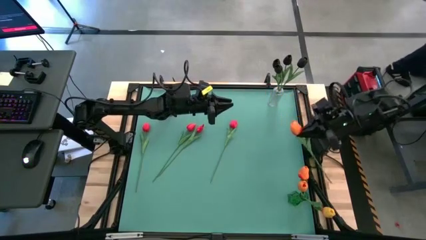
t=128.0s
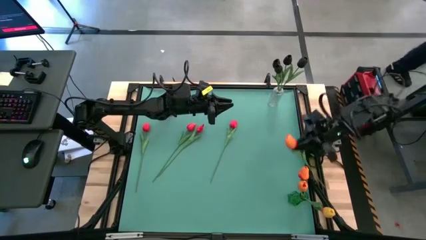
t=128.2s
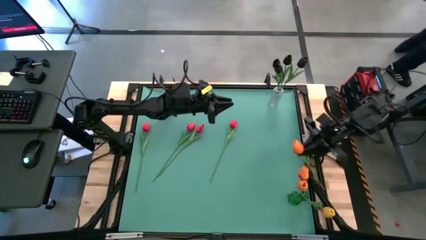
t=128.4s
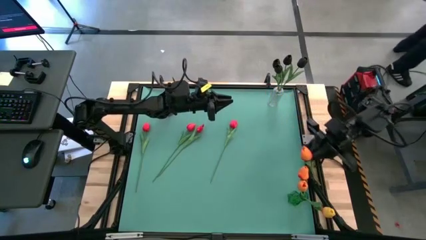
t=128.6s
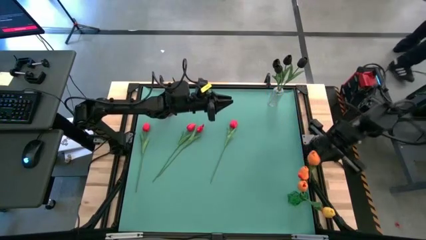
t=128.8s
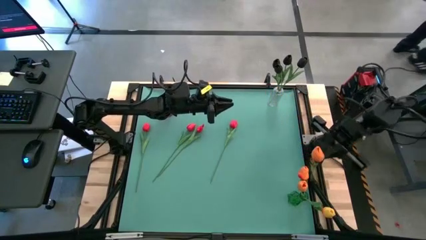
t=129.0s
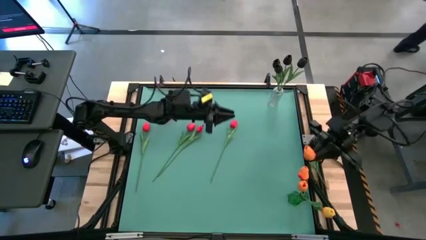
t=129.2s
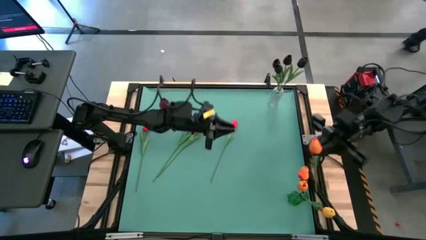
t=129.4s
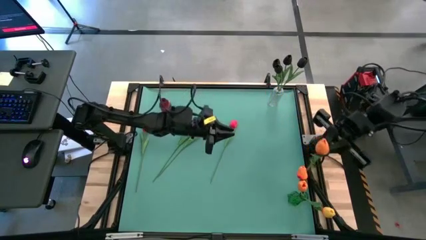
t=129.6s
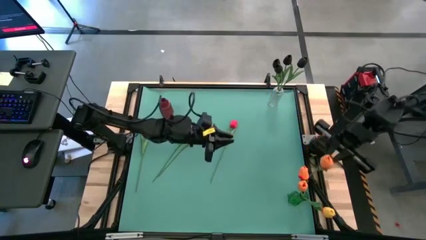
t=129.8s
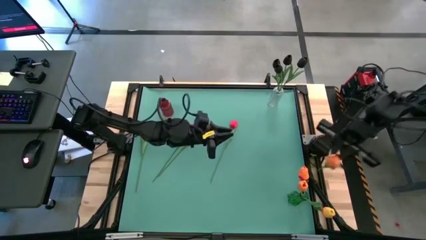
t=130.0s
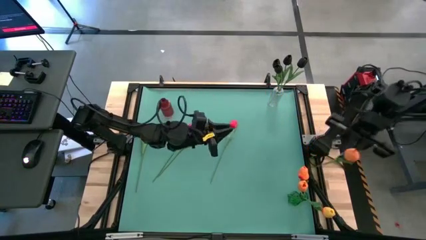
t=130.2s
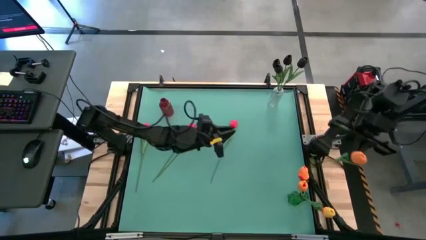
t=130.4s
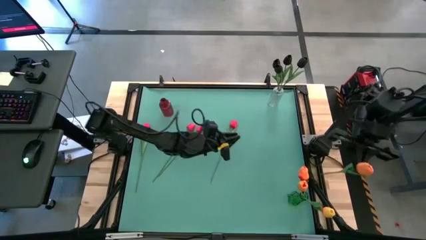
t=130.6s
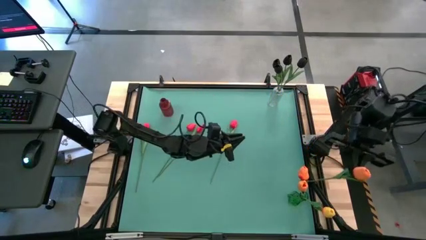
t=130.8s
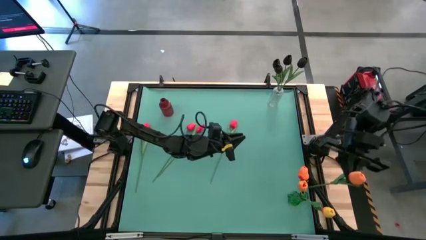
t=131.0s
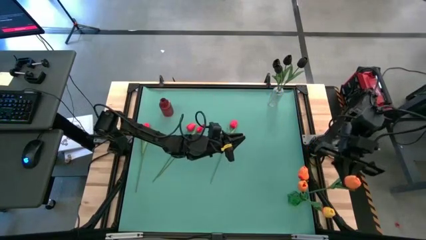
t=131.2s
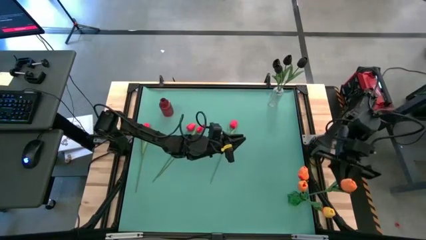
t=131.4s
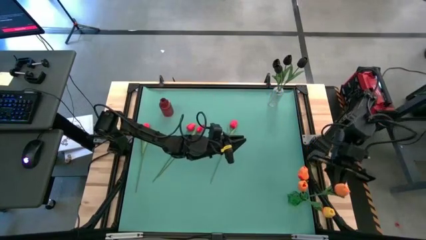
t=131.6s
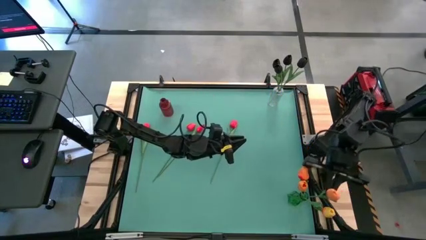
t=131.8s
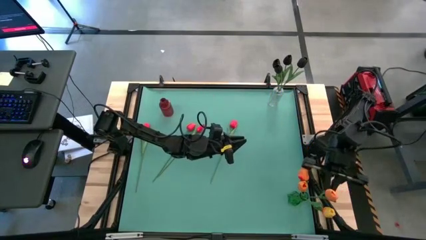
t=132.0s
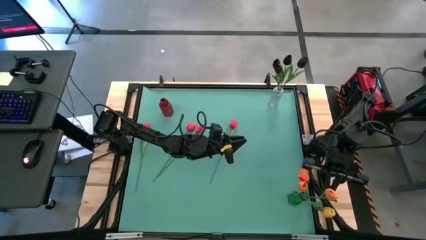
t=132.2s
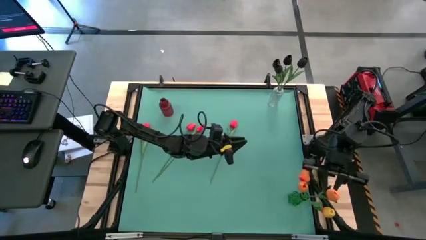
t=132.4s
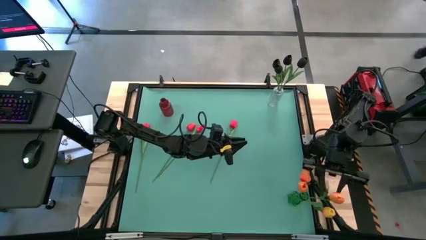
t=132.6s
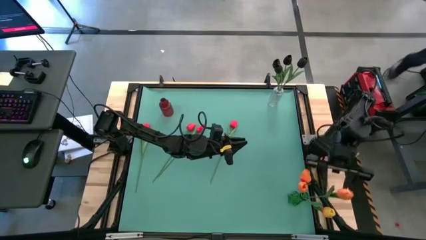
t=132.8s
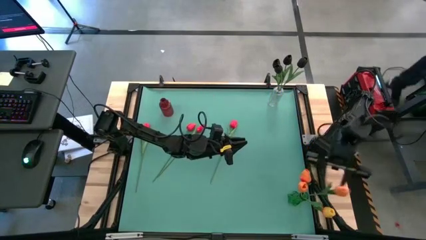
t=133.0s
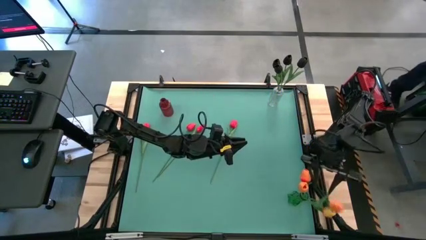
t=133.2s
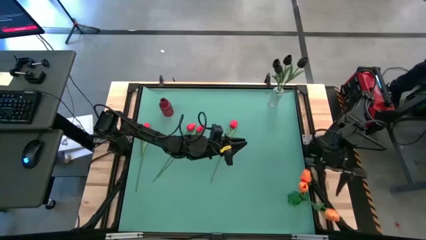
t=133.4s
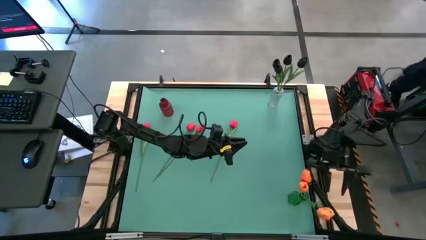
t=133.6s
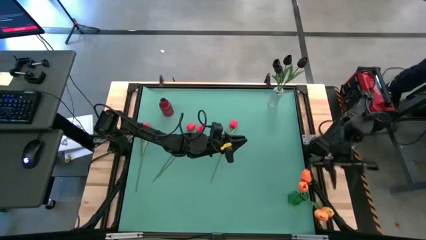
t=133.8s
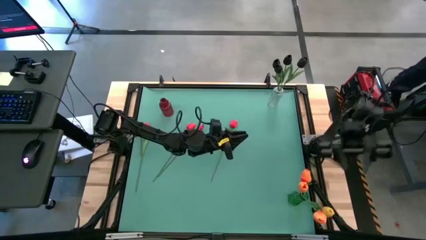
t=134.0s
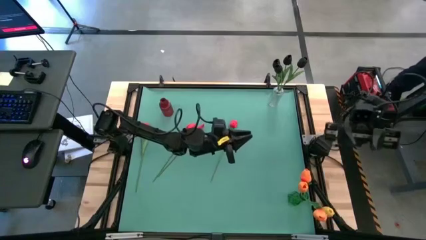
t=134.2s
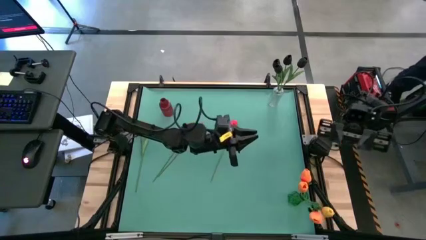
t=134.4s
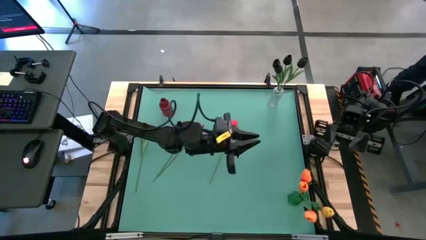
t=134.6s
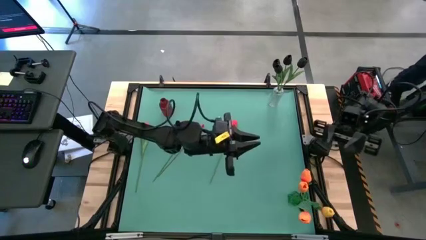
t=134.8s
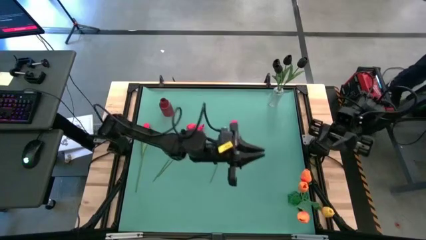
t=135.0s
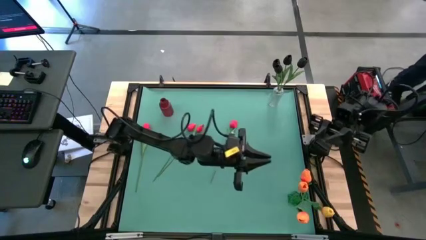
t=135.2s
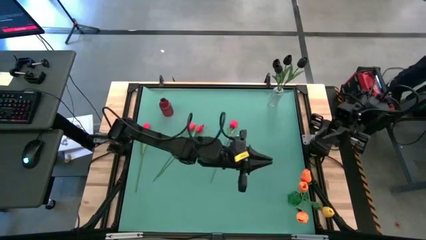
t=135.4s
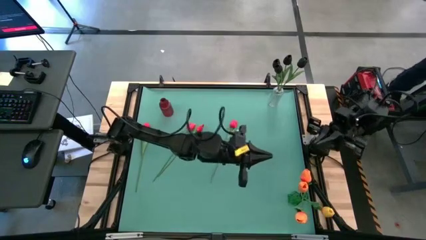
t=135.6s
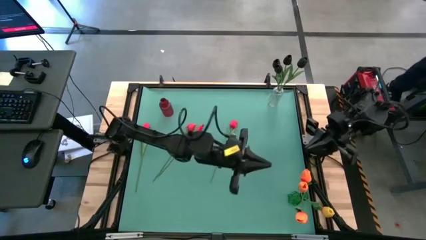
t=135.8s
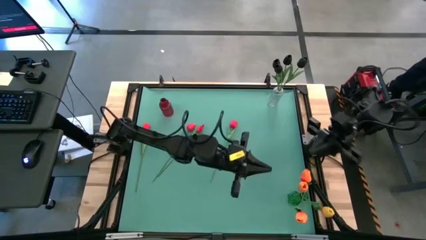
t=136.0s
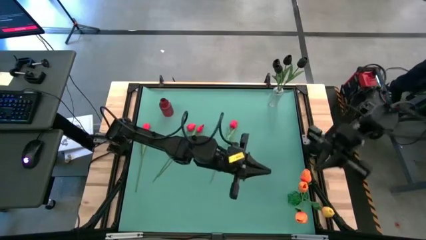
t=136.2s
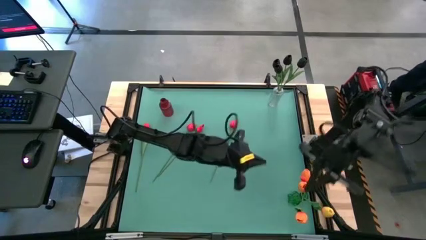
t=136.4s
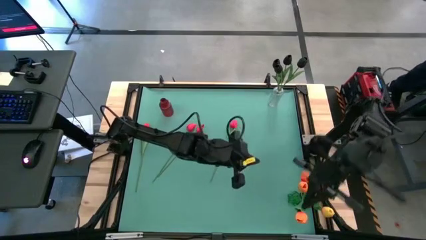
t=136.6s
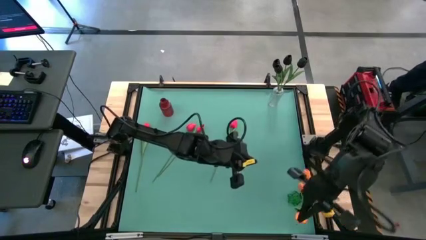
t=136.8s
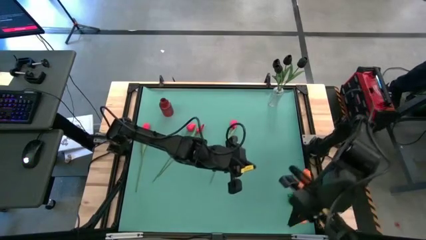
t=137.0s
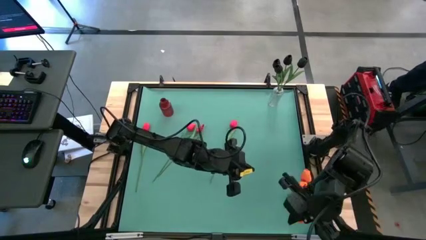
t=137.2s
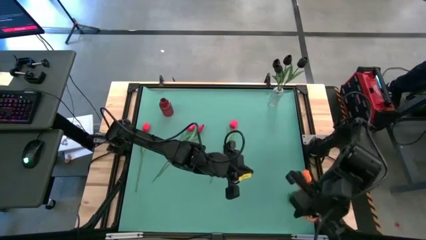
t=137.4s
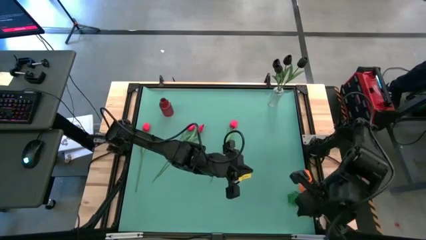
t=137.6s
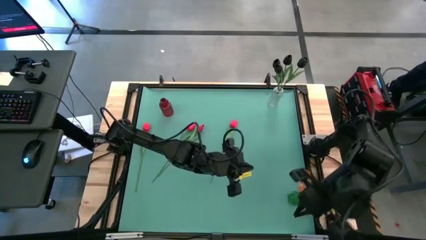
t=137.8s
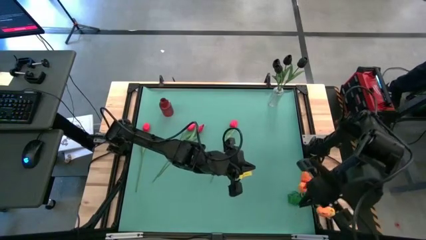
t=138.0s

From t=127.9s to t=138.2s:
Task: Sort flowers into vase by color
Put the orange tulip into the green vase

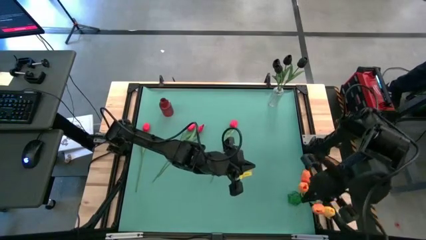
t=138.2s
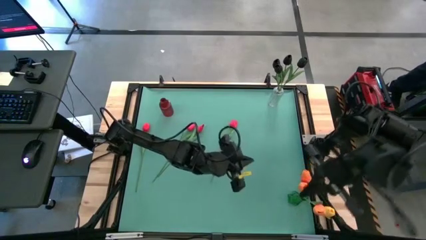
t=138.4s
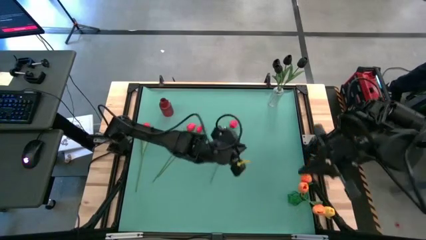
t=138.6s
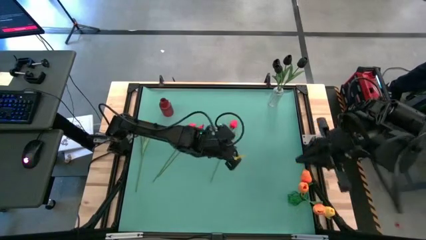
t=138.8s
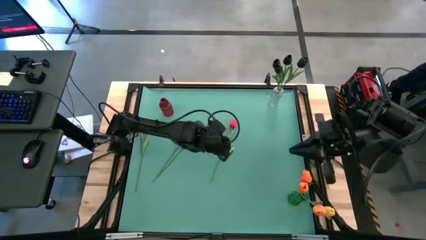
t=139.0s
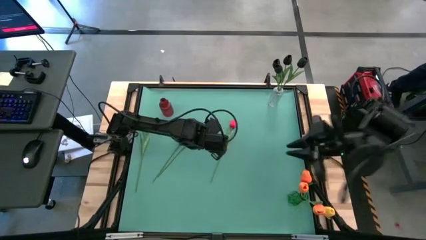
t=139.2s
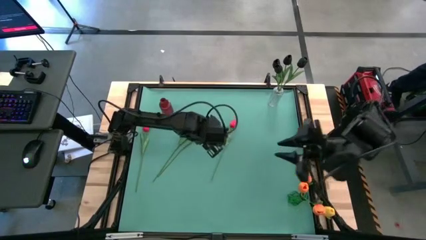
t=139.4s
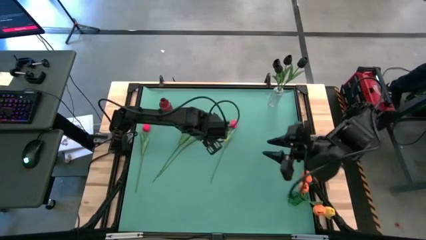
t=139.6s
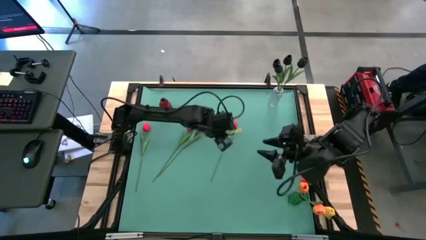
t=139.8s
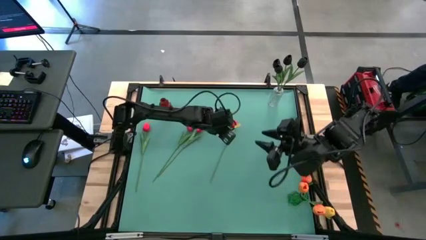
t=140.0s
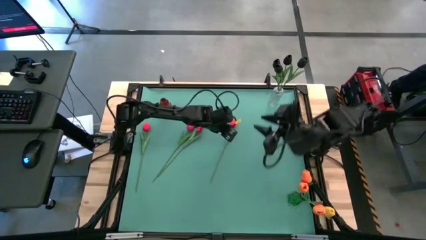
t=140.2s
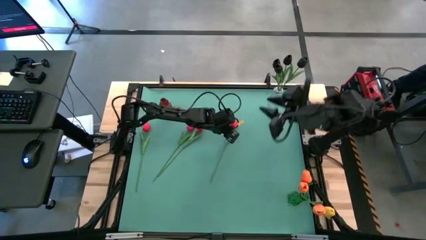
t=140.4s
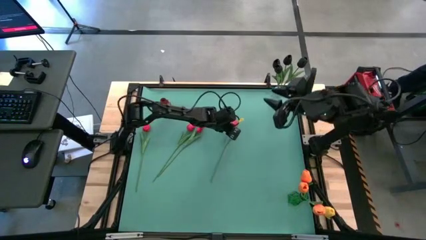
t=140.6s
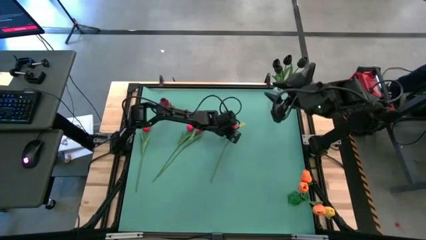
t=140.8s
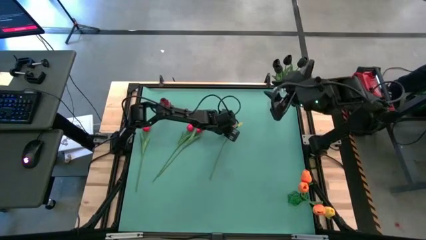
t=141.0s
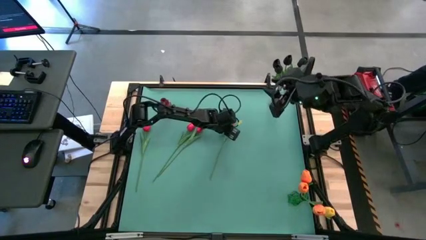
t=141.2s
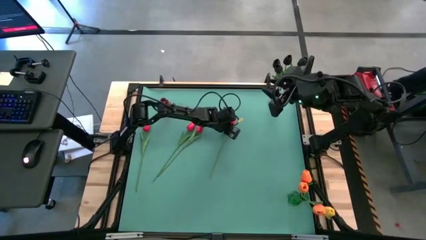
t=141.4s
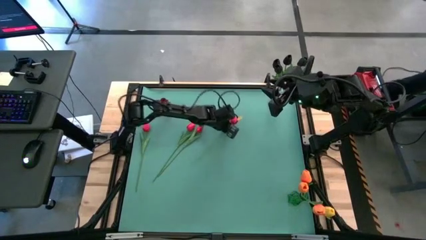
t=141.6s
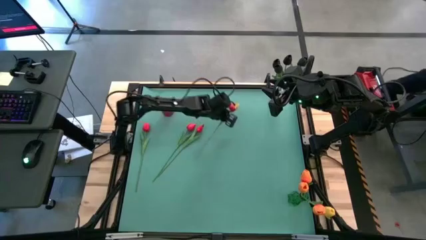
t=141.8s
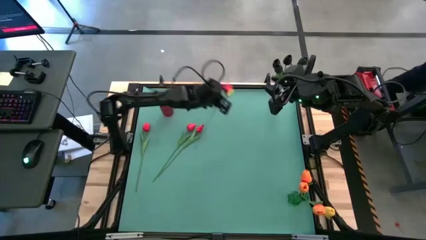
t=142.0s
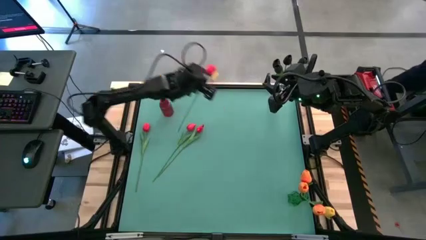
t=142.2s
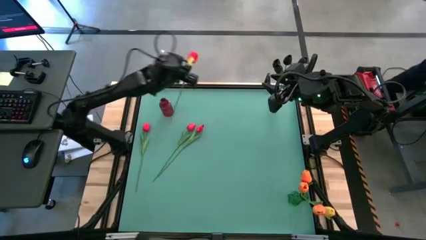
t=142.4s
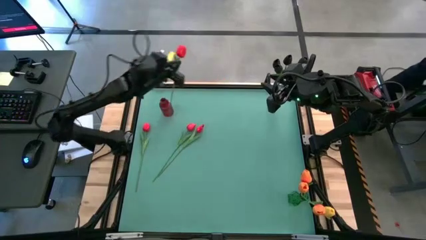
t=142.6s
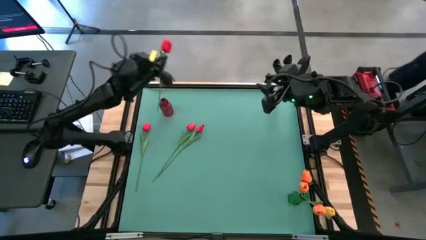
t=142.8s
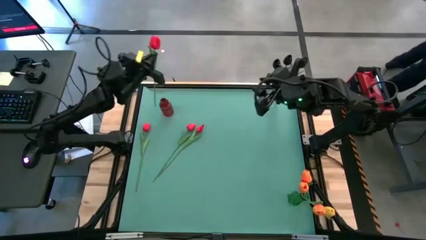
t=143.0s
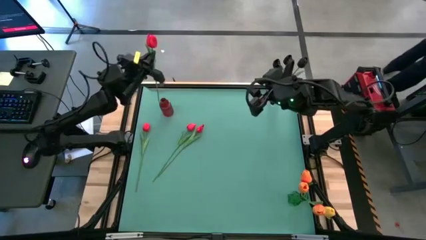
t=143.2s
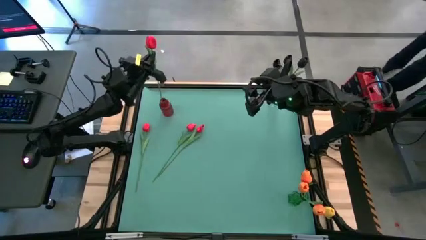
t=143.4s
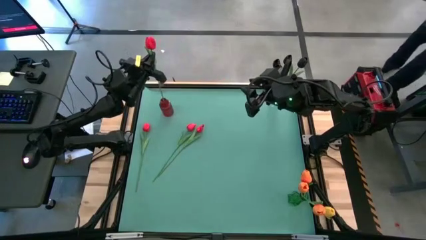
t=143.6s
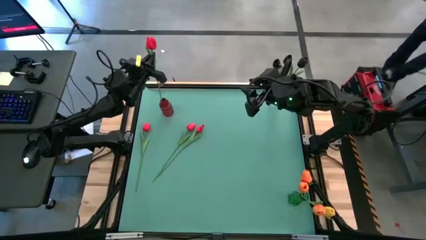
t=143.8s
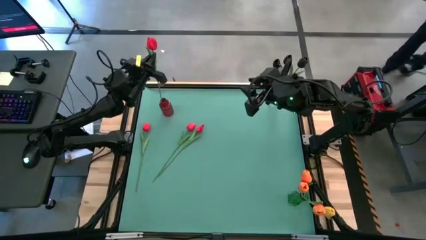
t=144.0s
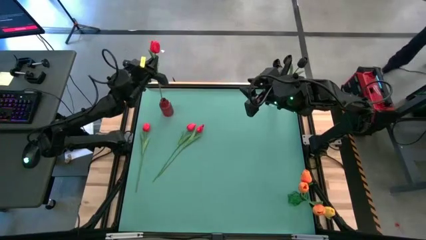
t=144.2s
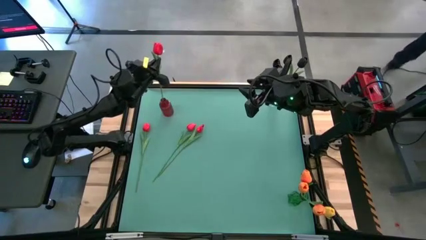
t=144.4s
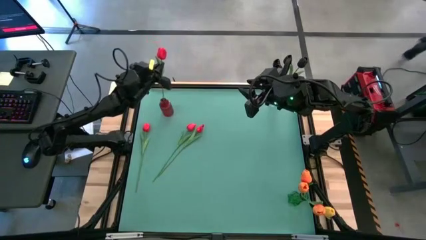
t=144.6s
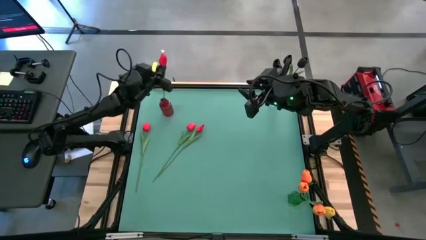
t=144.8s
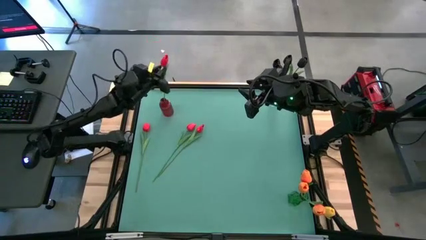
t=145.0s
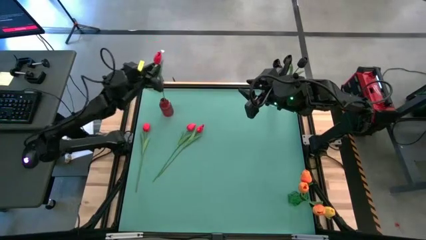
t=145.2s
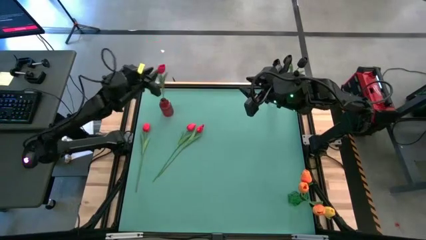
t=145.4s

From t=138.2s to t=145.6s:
Put the red tulip into the red vase
